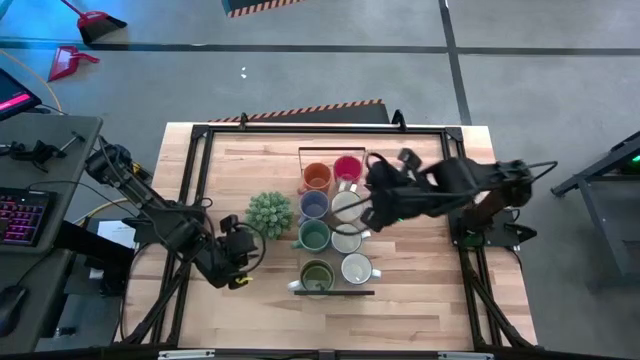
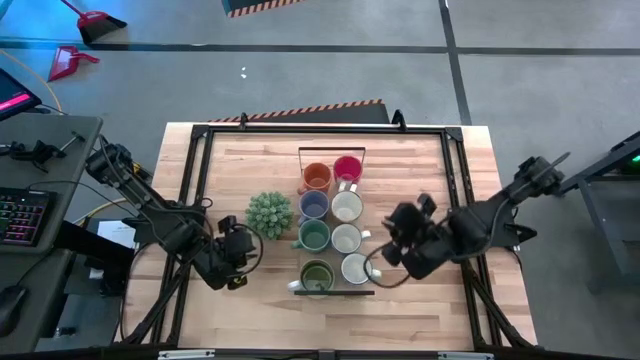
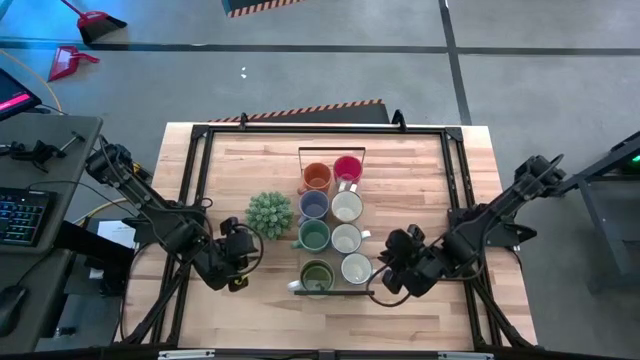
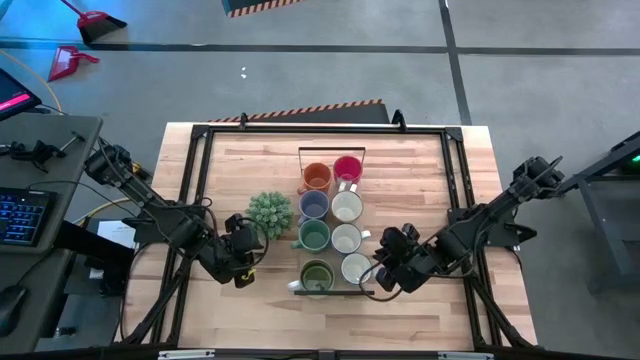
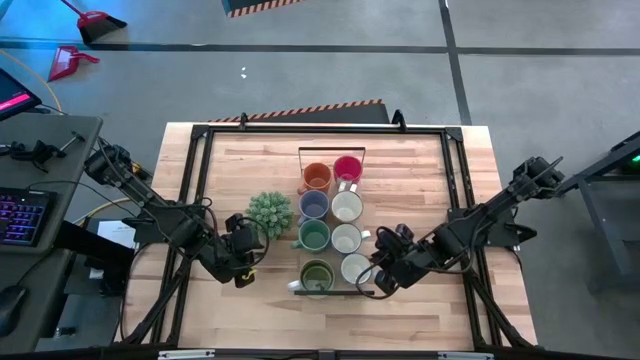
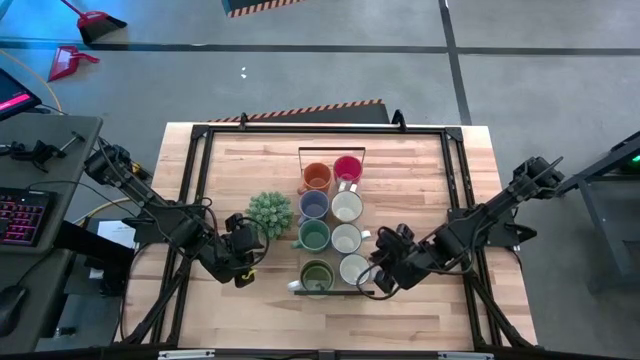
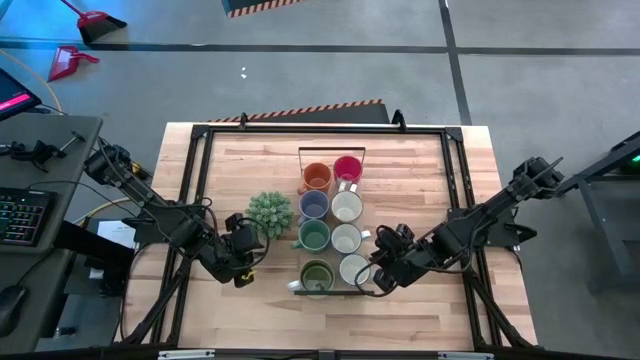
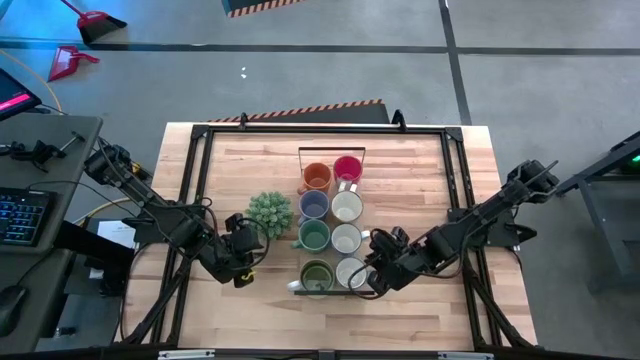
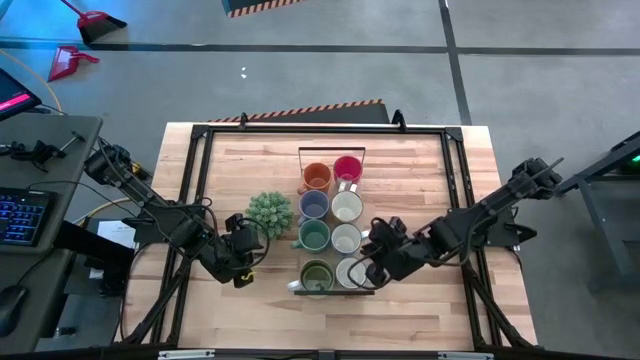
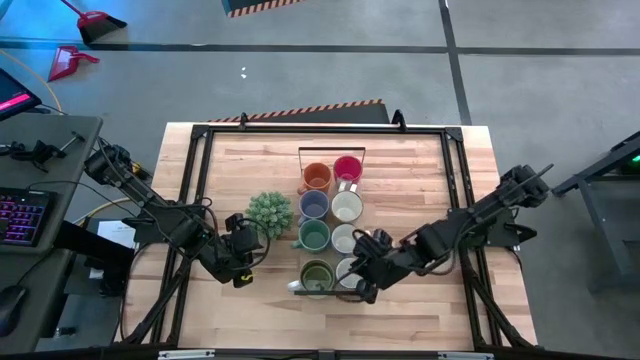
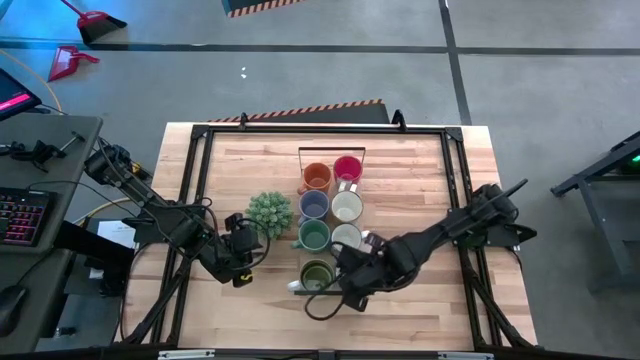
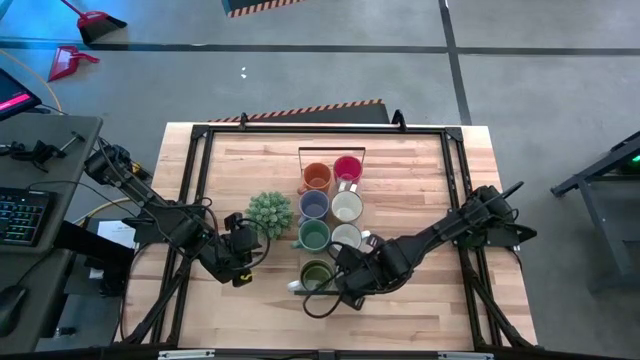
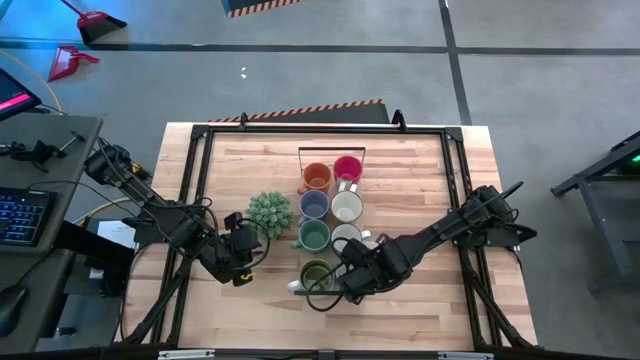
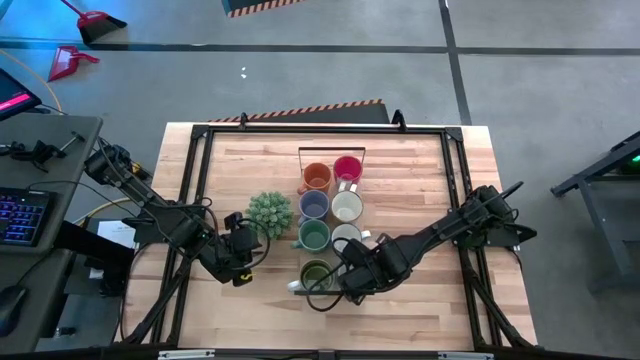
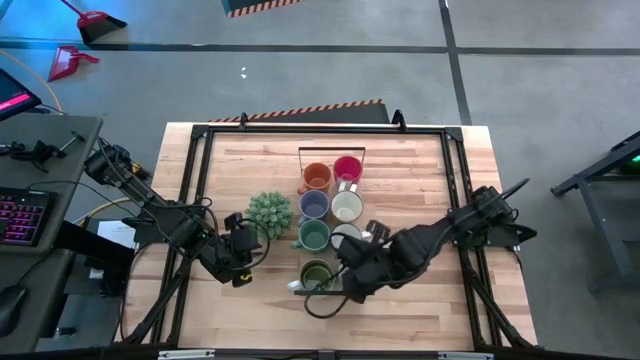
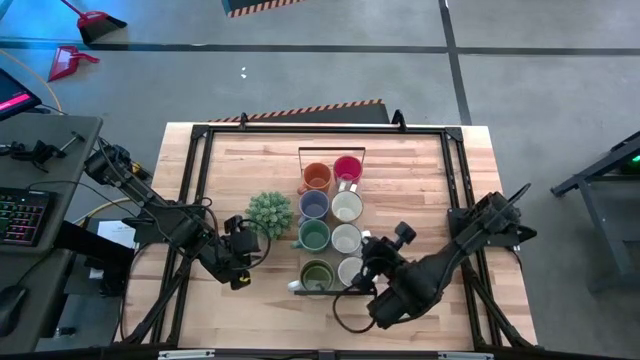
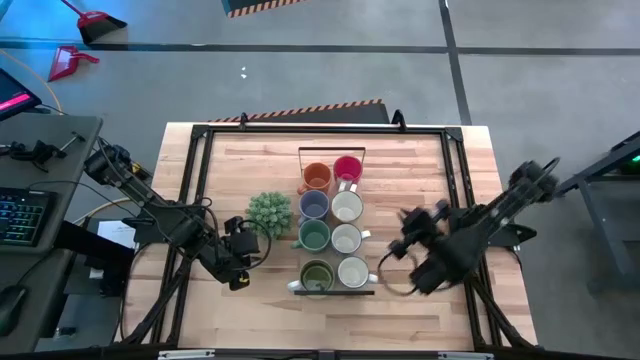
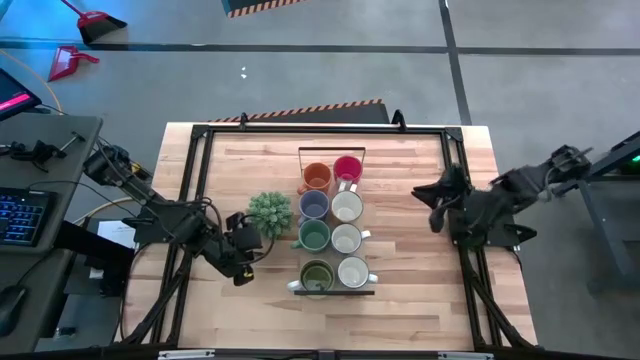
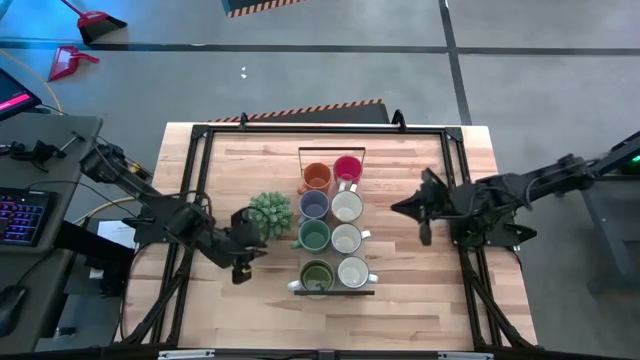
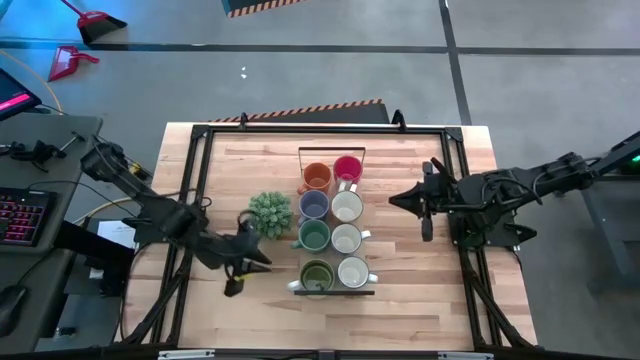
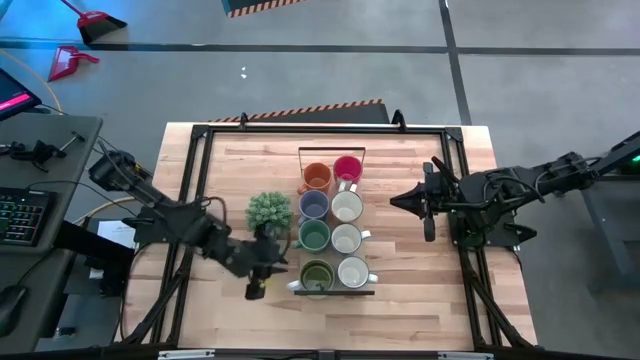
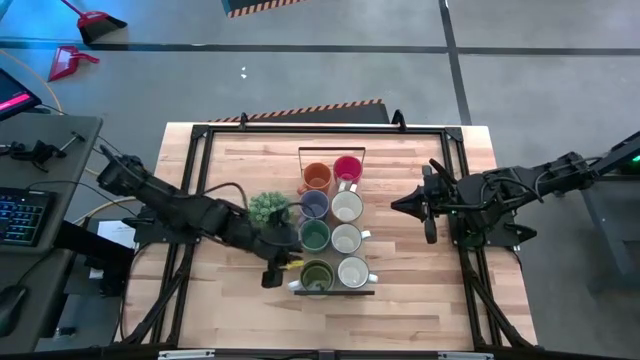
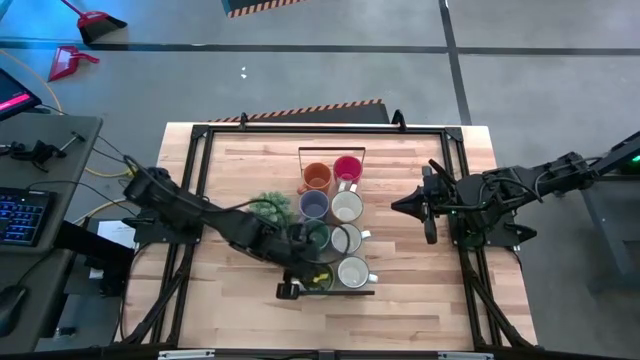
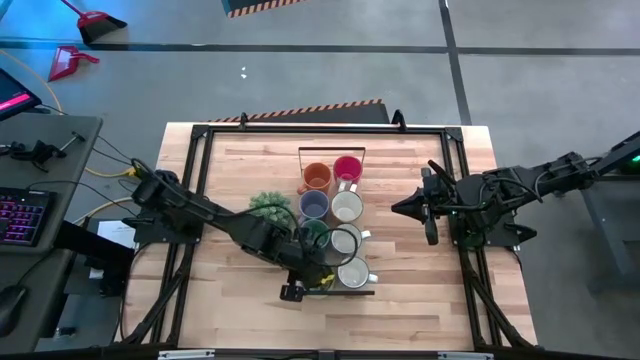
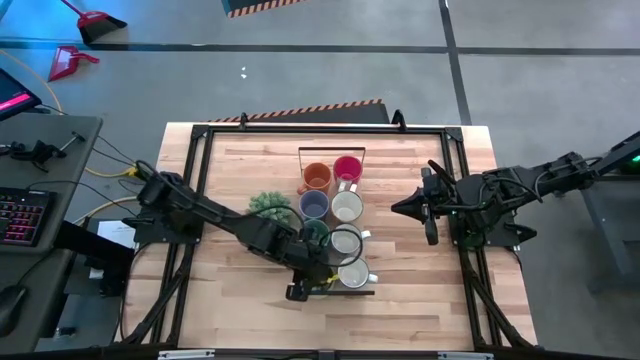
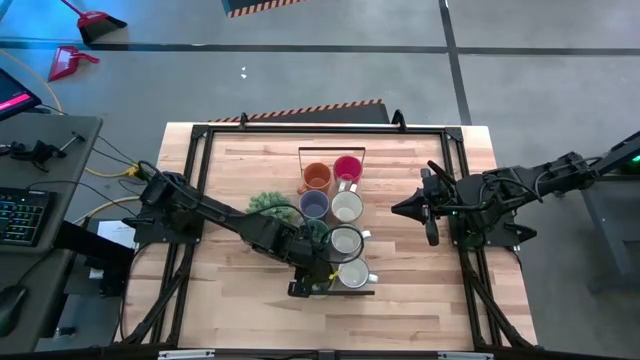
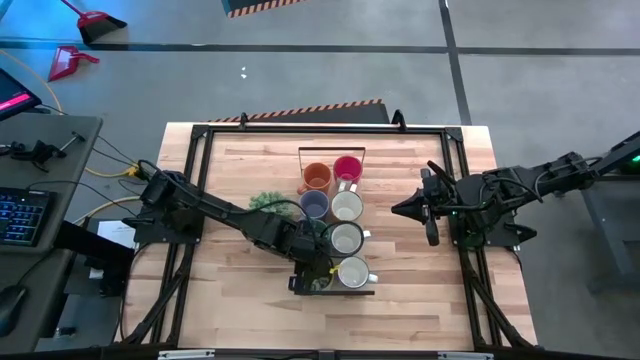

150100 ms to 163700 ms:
Task: Place coffee mugs
Adjust the mugs

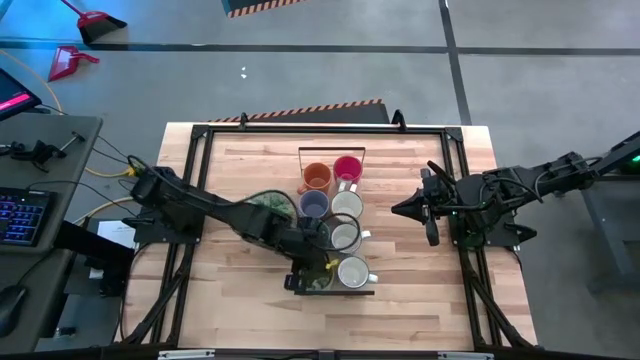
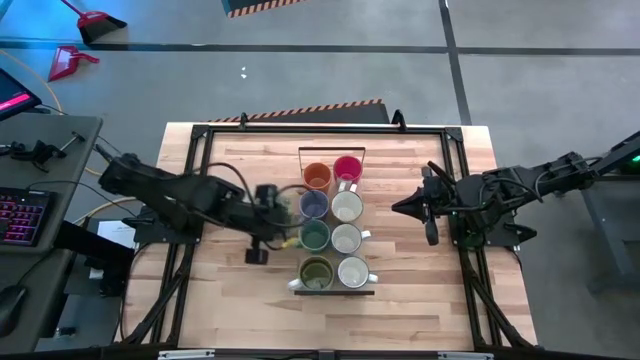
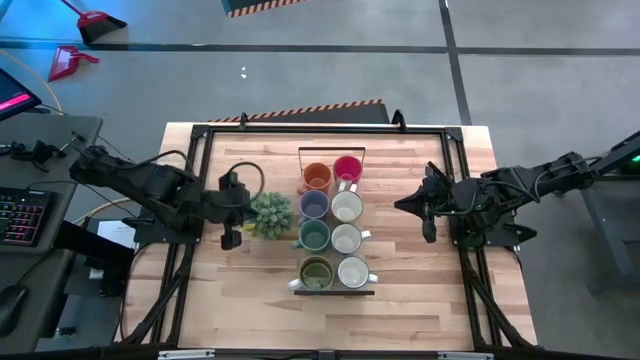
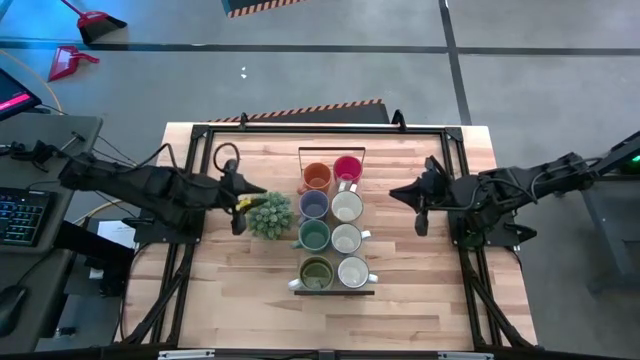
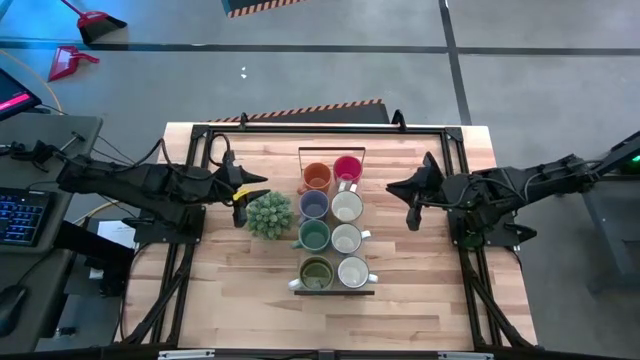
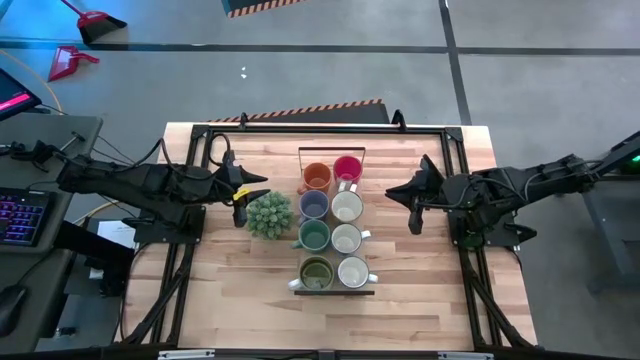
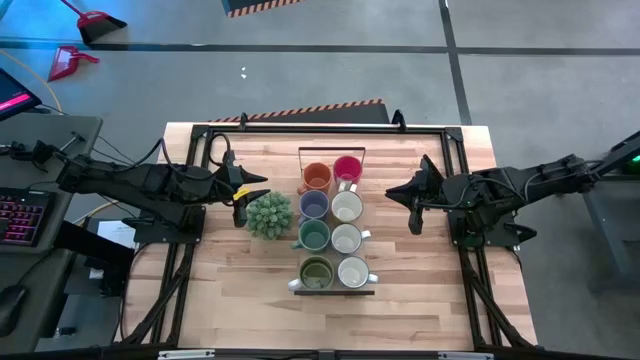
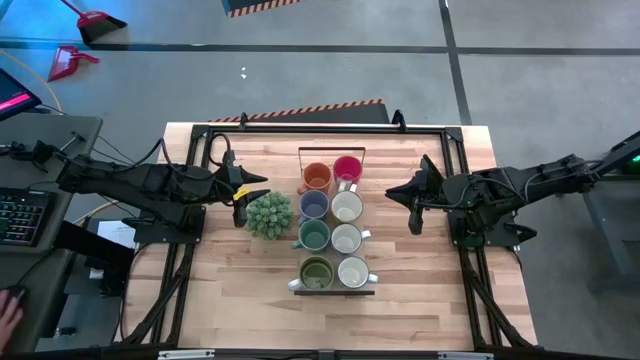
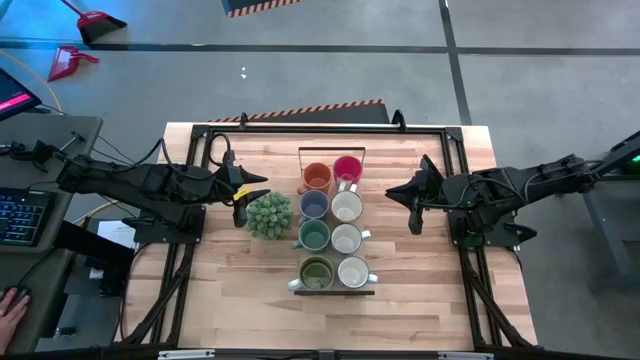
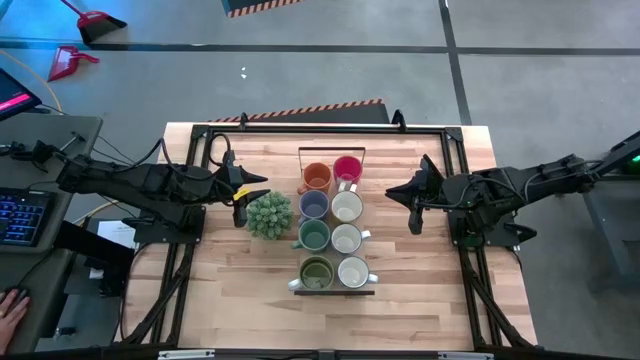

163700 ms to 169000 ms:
Return to Home Position

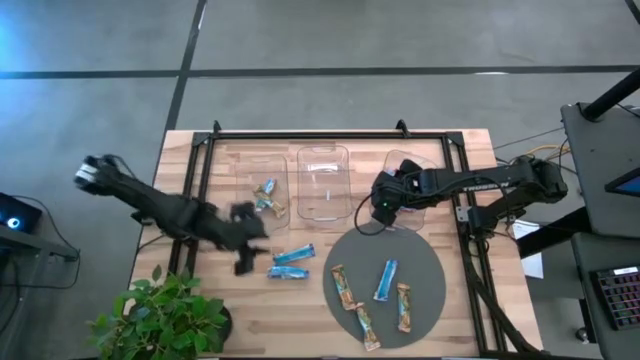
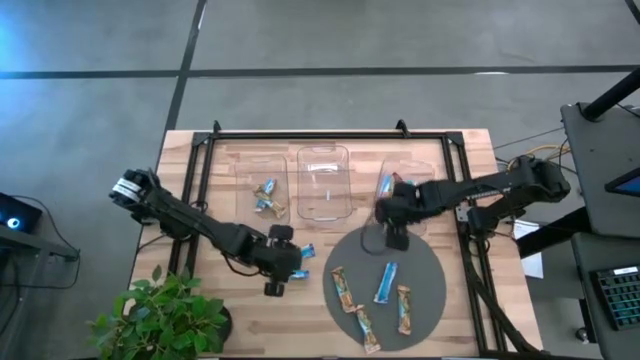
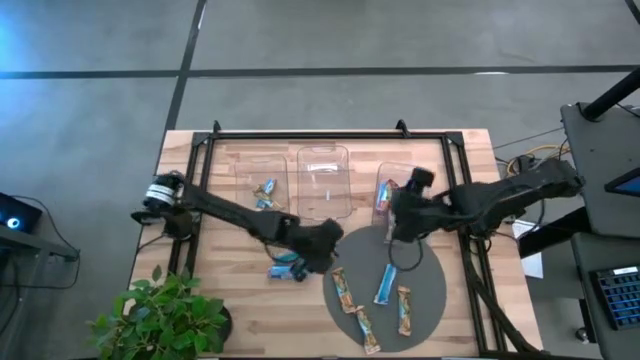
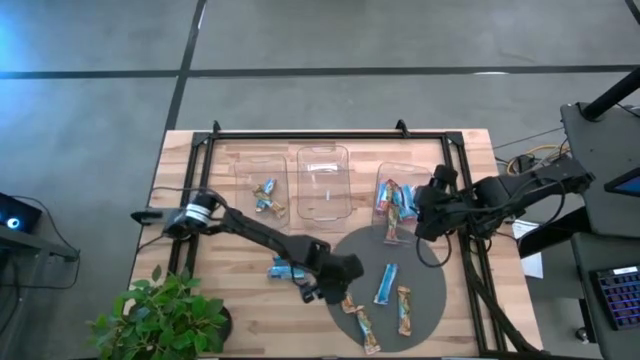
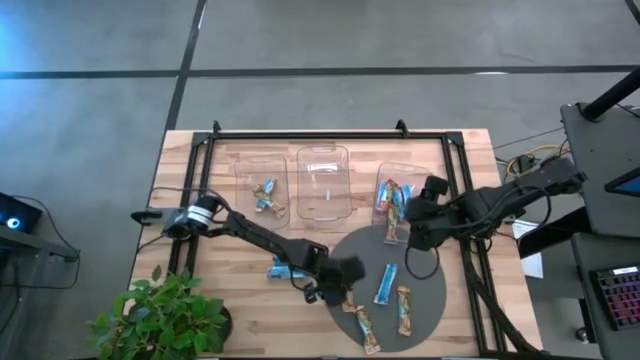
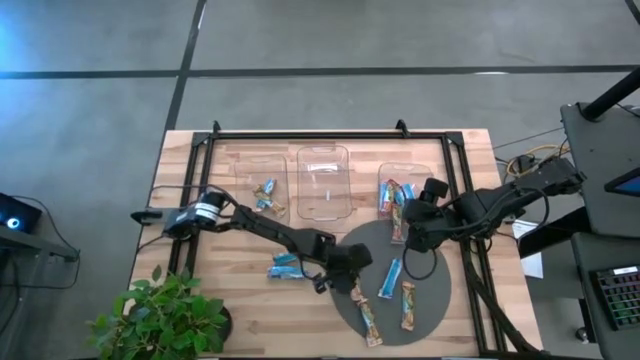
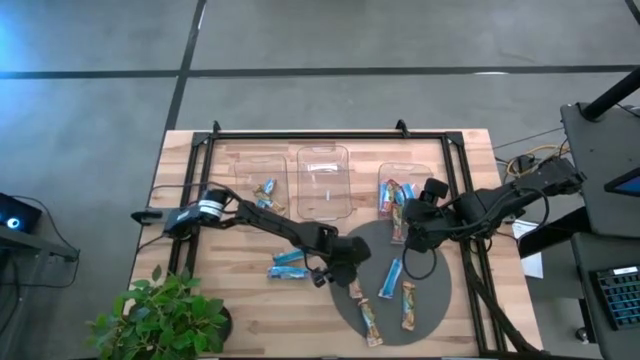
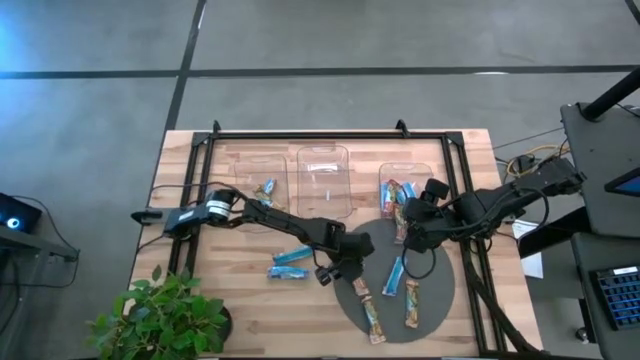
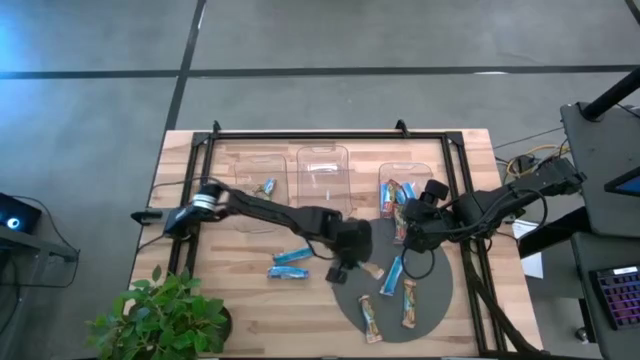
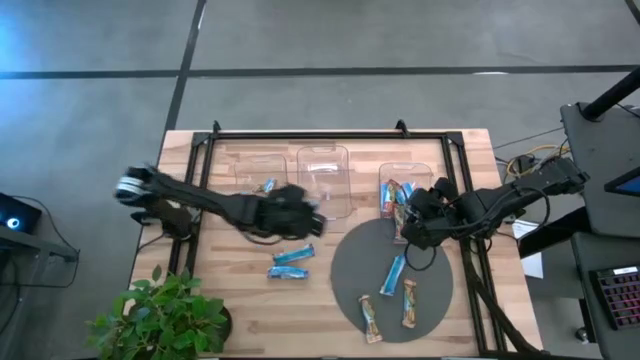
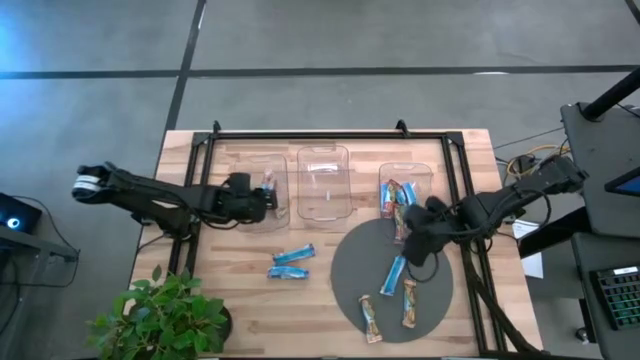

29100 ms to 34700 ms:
Task: Pick and place Granola Bars by type
Put the yellow granola bar into the left transparent bin
